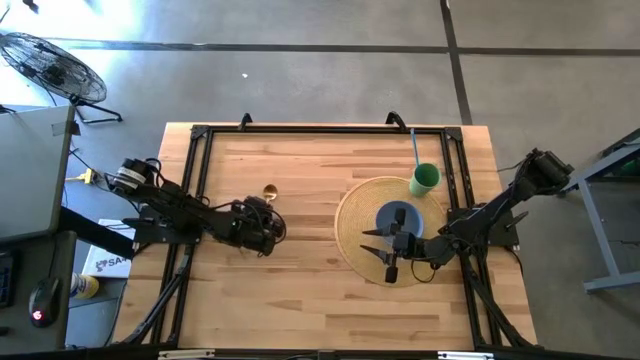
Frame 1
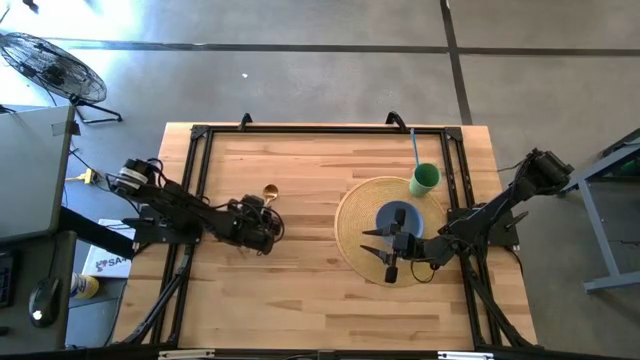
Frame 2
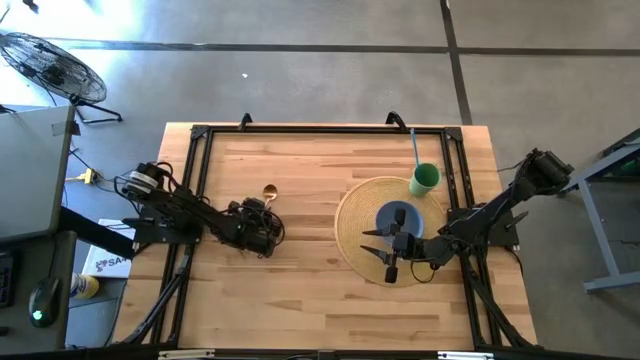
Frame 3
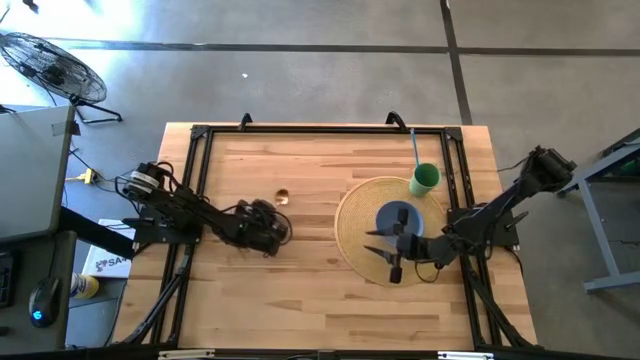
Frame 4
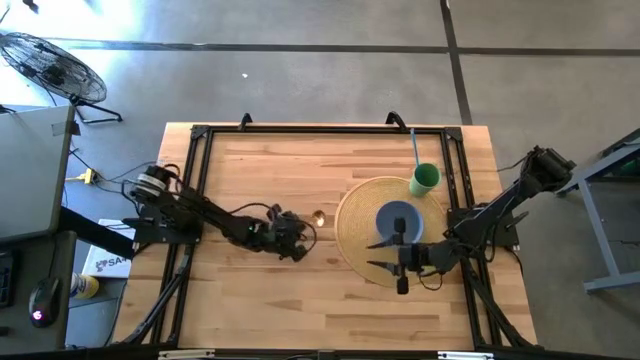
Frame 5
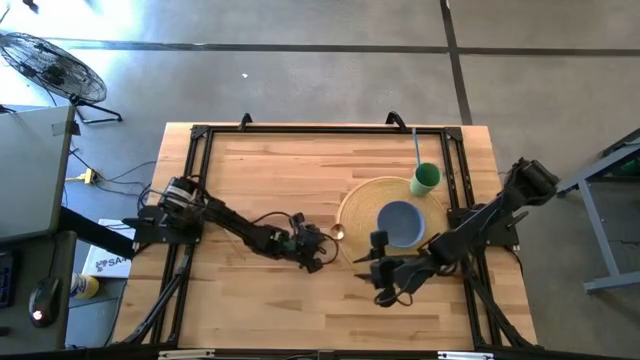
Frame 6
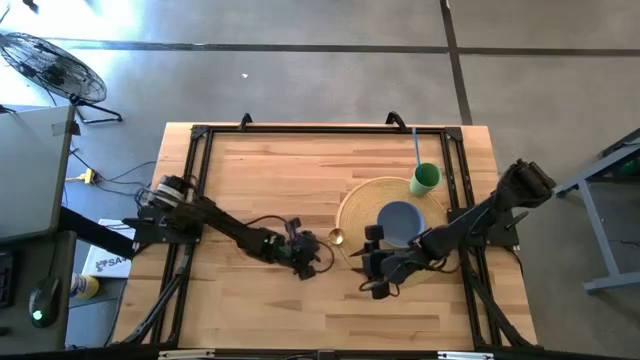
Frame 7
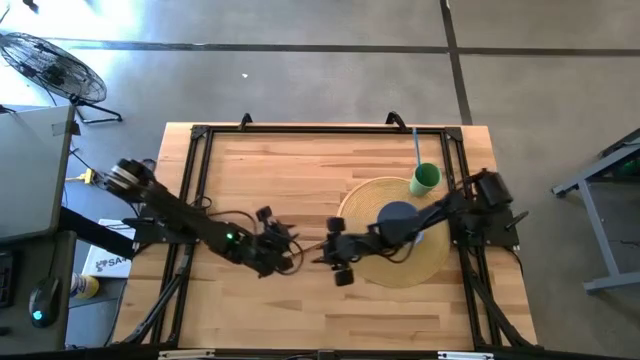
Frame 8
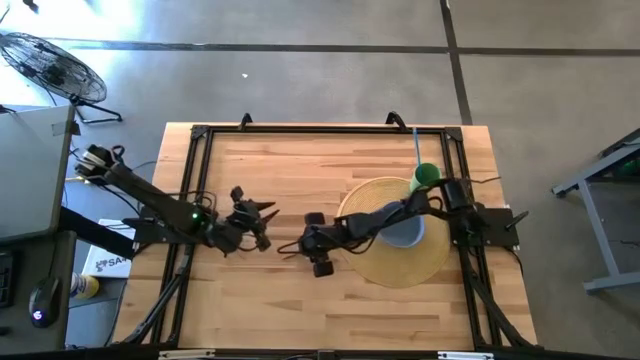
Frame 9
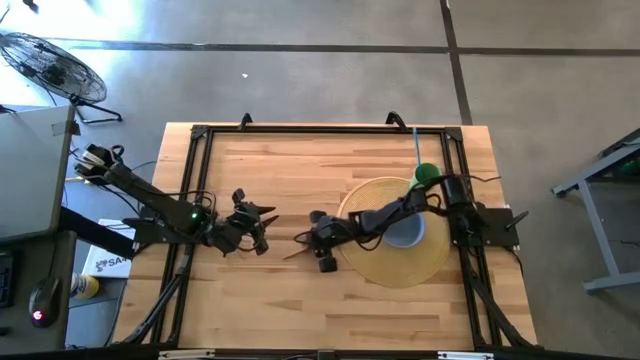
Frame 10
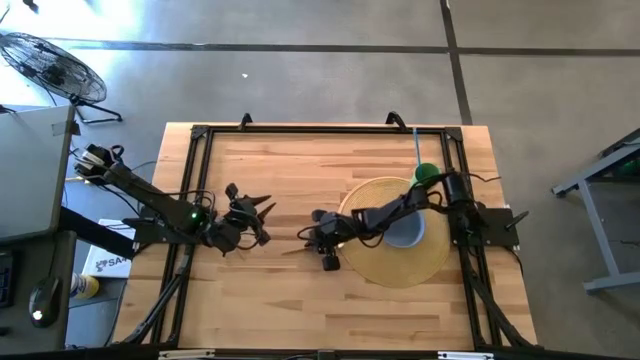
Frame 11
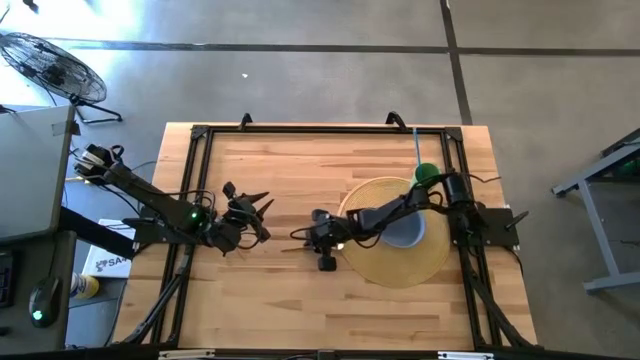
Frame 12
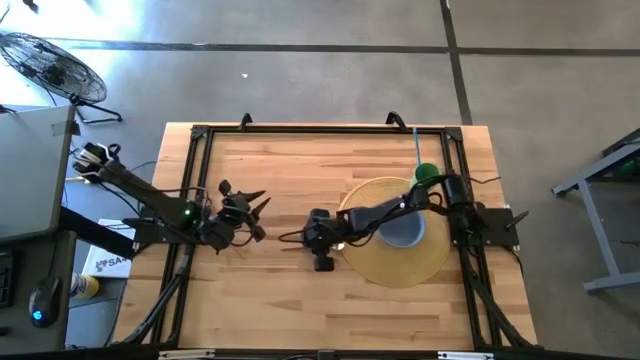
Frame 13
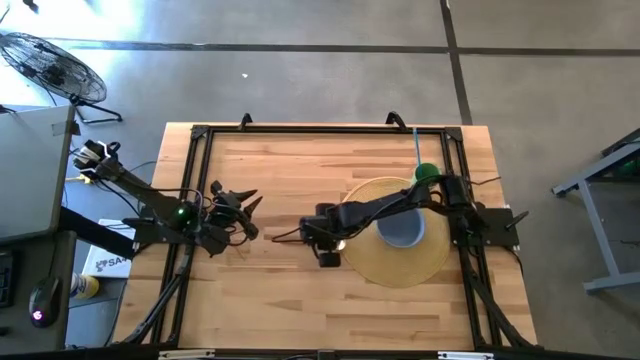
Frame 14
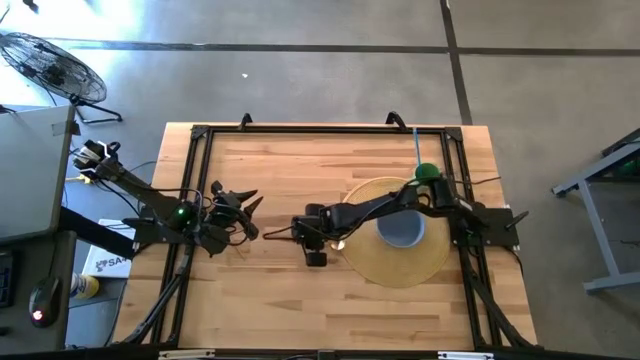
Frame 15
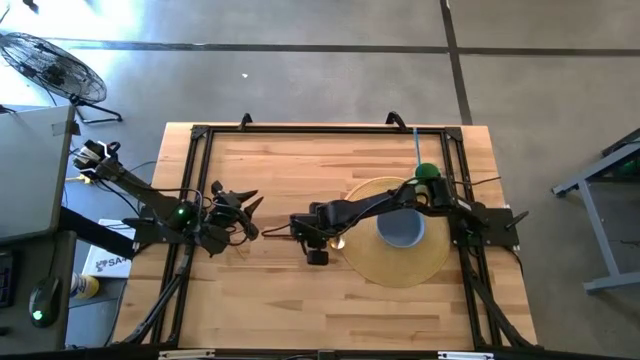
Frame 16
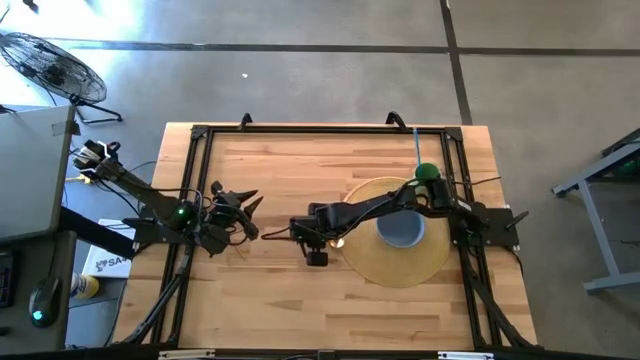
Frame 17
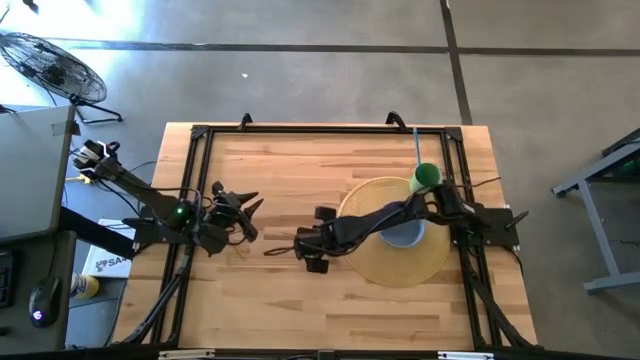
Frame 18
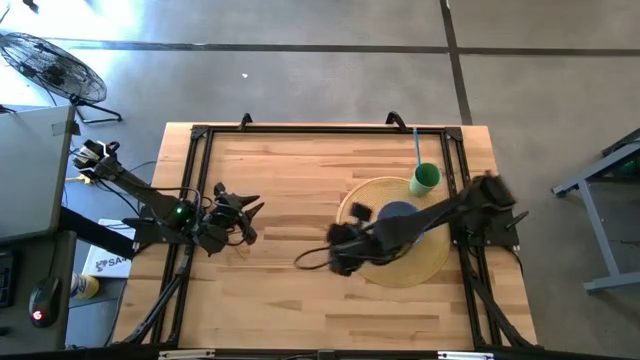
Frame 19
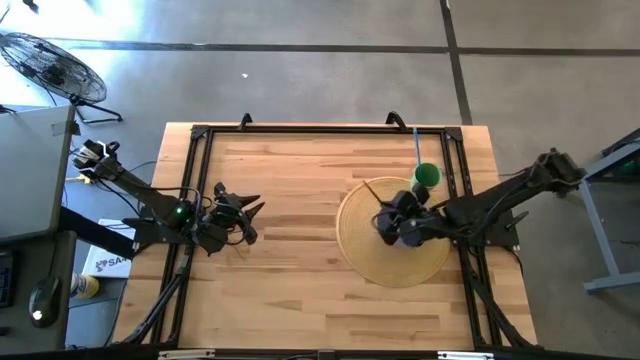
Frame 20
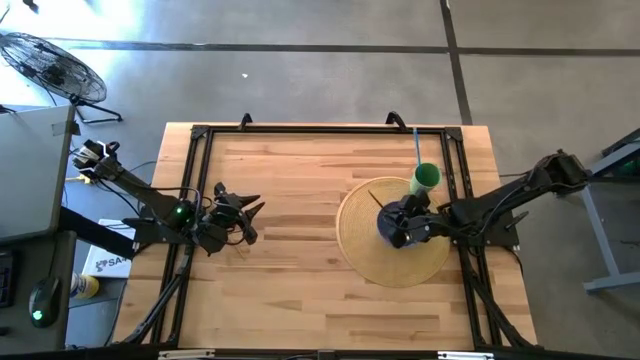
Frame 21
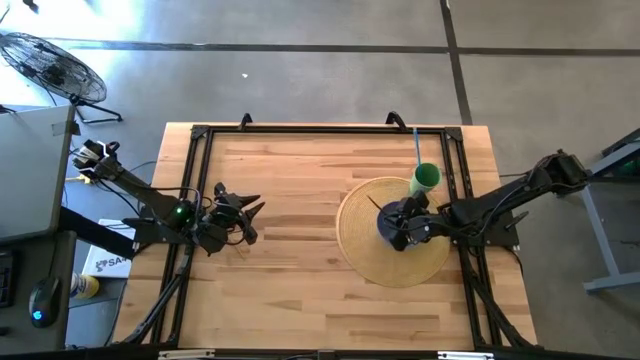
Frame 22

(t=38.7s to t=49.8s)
Task: Pick & Place Utensil
Put the spoon into the blue bowl

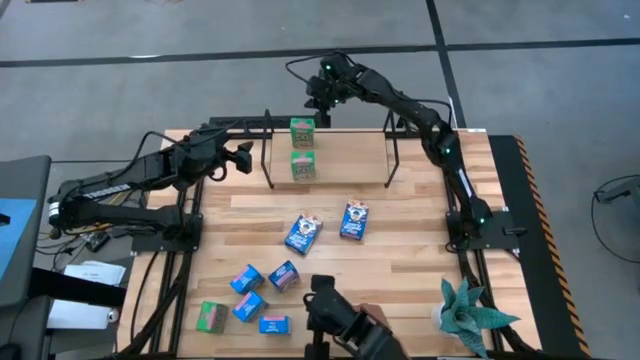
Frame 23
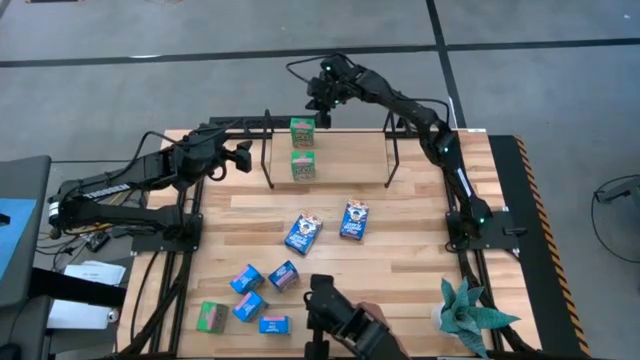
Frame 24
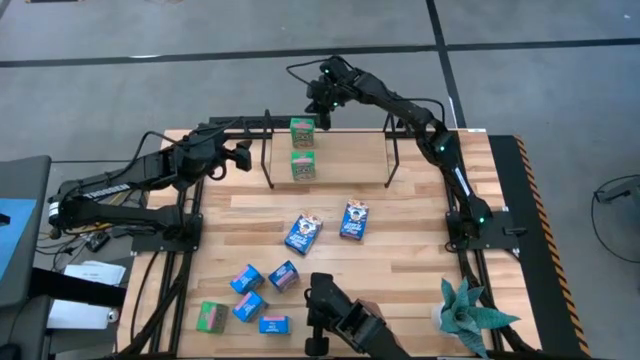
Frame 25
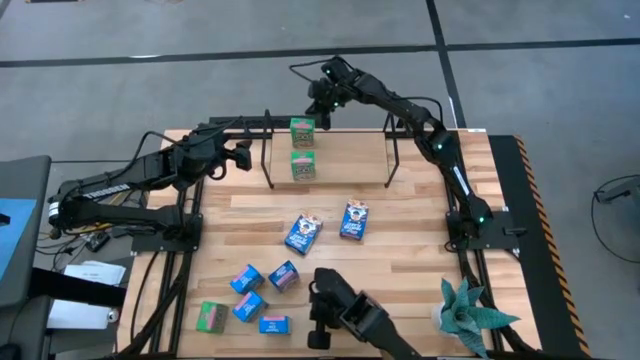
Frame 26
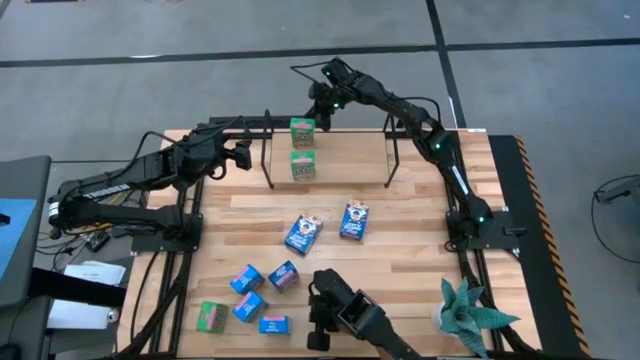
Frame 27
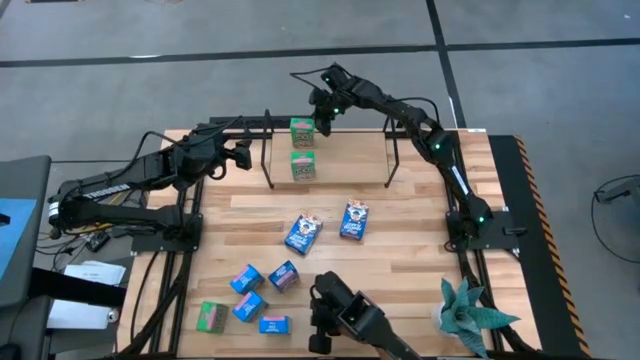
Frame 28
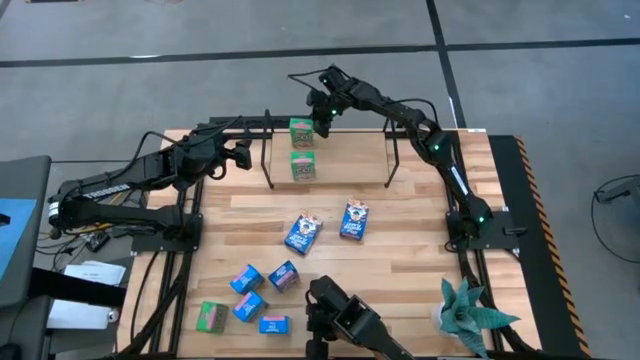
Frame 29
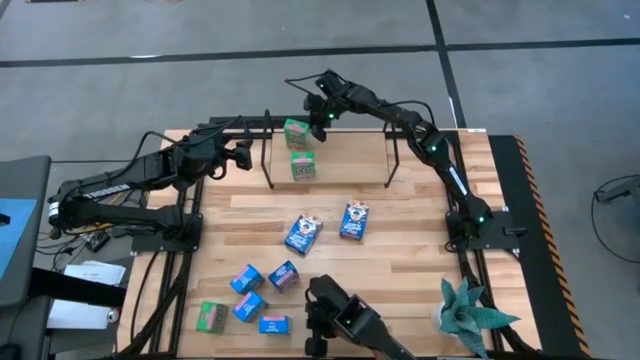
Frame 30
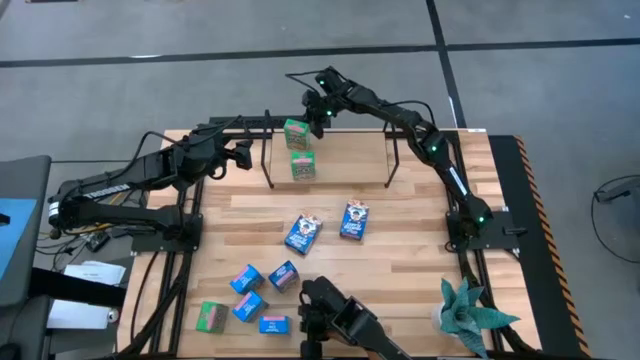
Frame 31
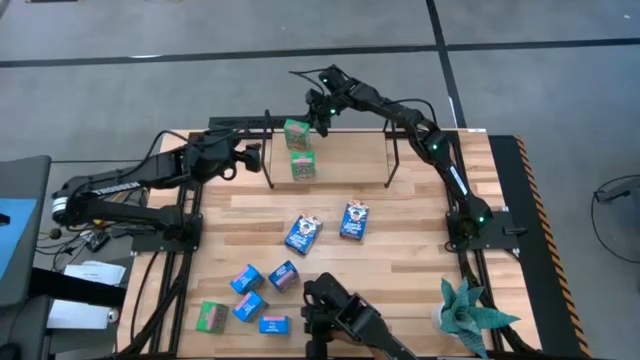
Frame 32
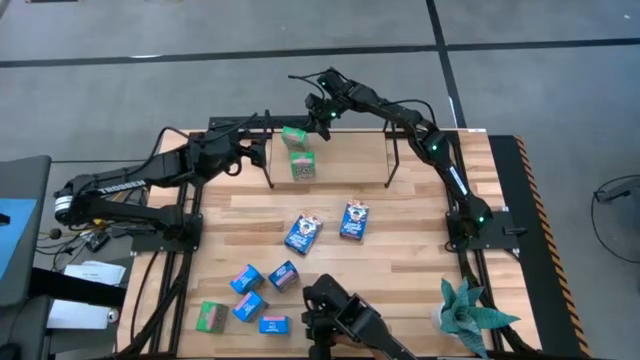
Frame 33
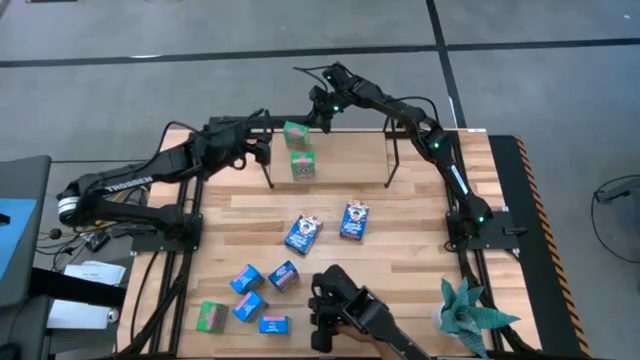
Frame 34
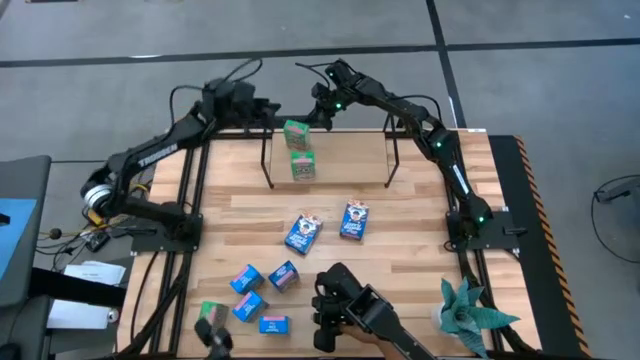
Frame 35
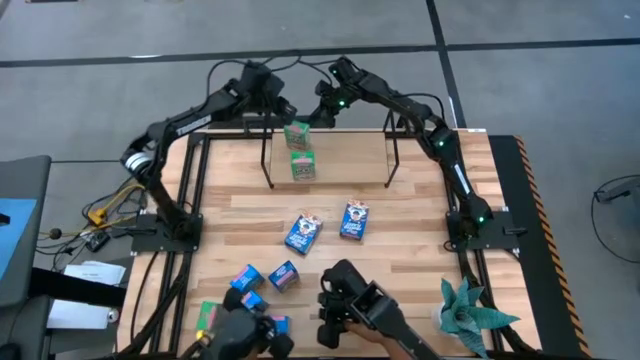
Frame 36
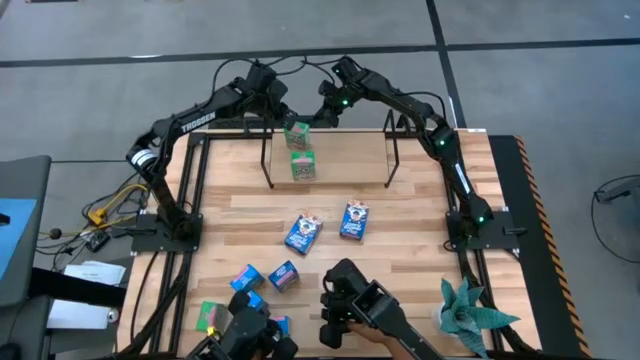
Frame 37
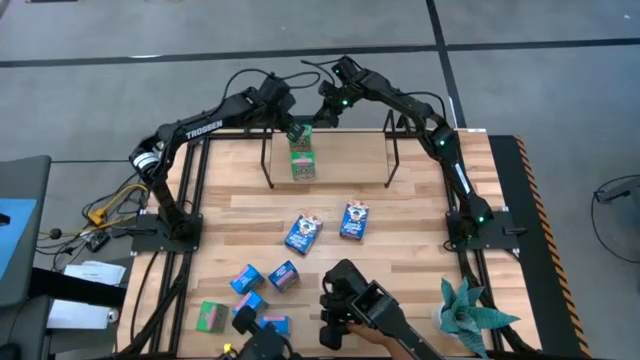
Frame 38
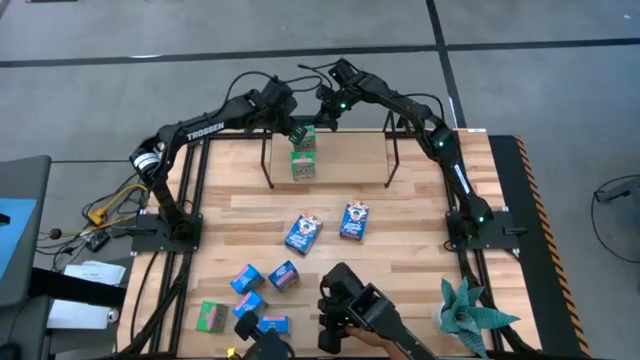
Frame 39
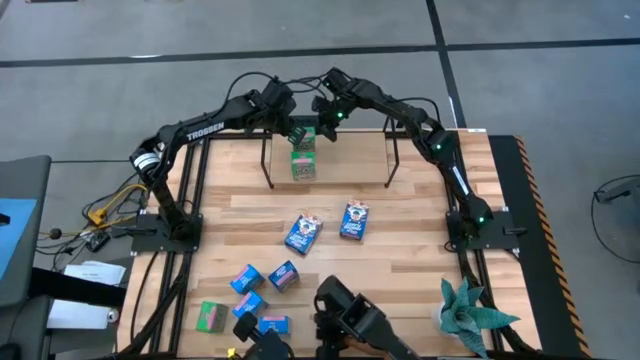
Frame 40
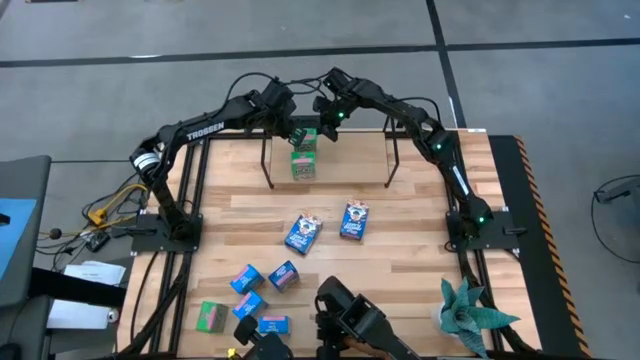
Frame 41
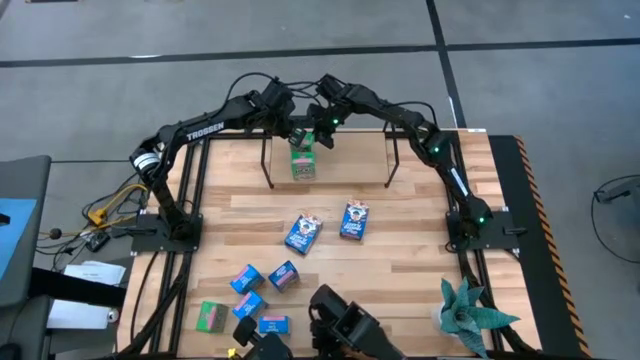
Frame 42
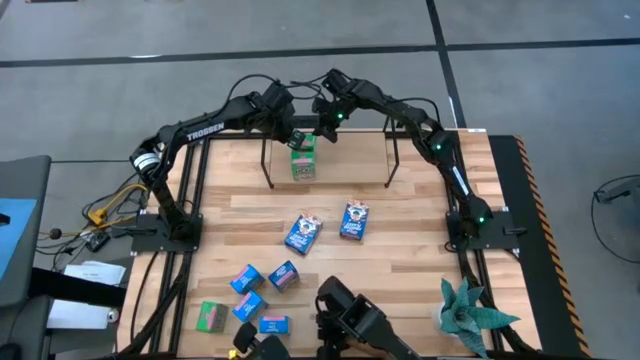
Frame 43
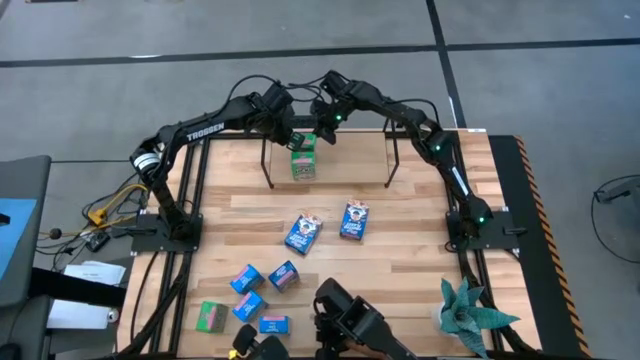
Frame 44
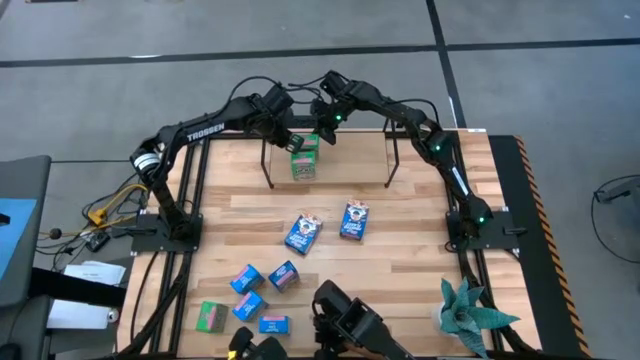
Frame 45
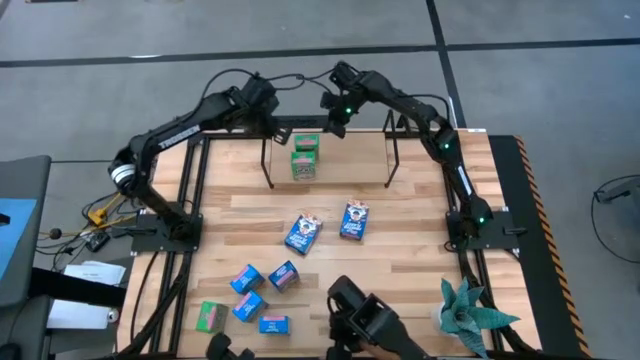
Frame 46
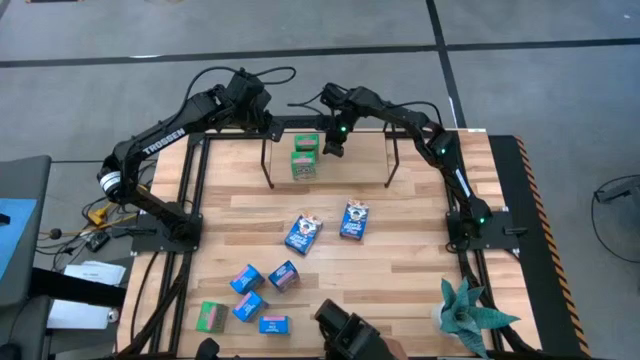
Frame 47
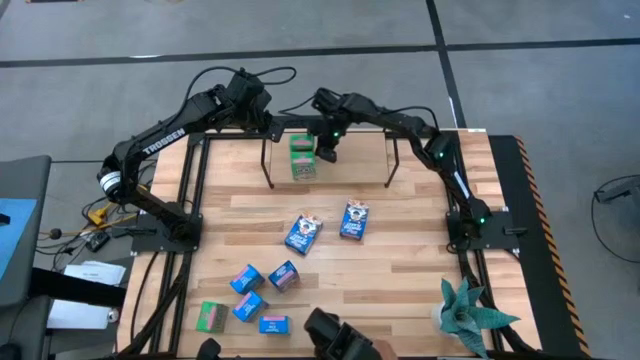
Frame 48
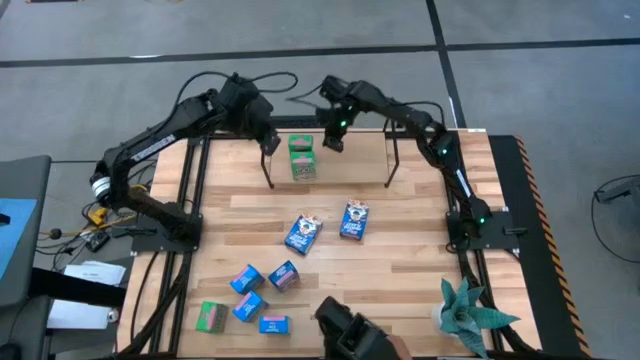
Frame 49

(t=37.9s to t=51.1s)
Task: Stack cereal on shelf
Put the right green cereal box on the shelf aligned with the other green cereal box
